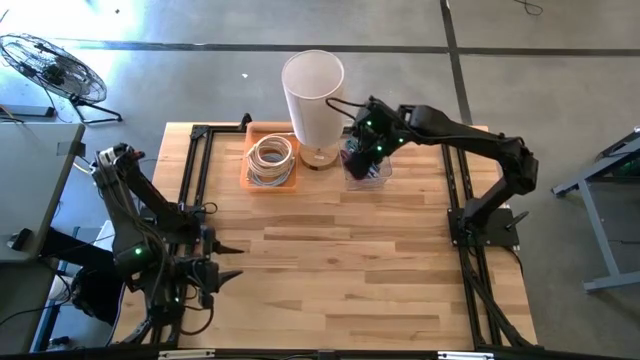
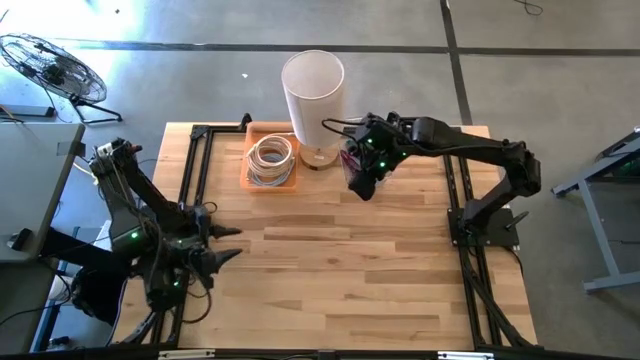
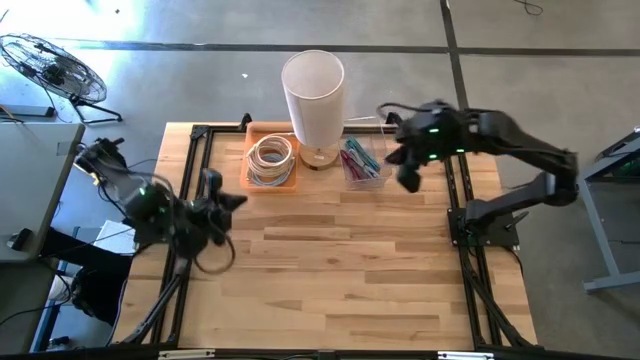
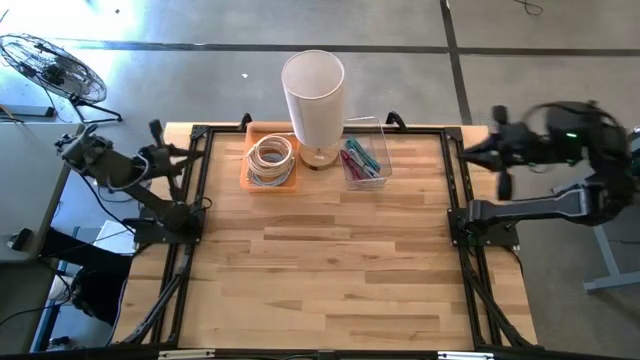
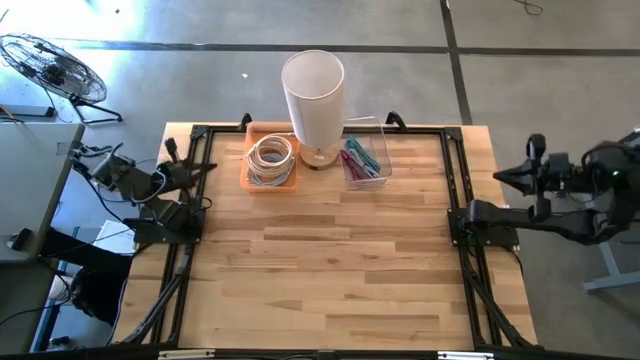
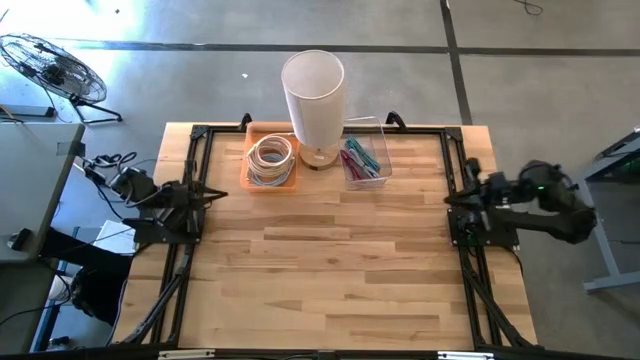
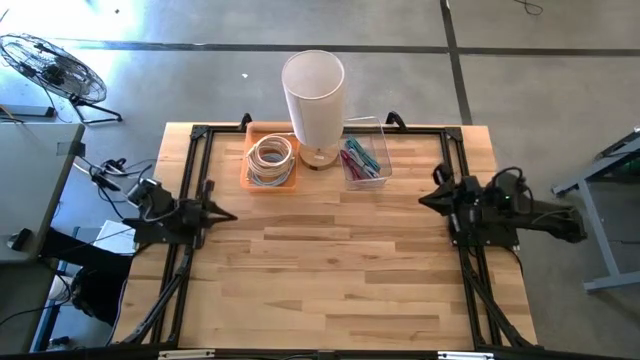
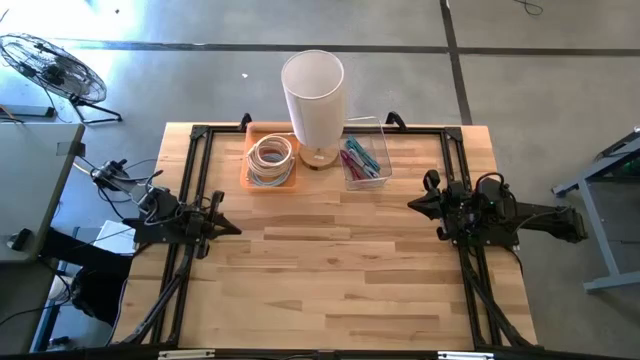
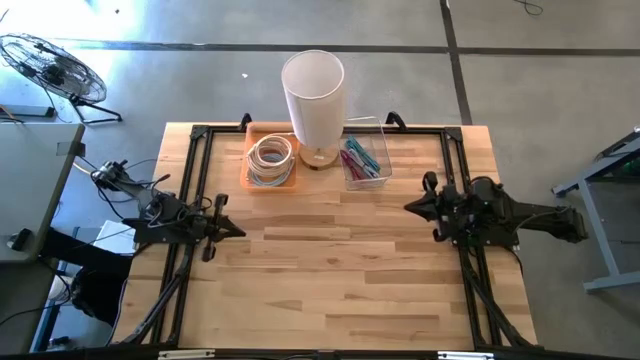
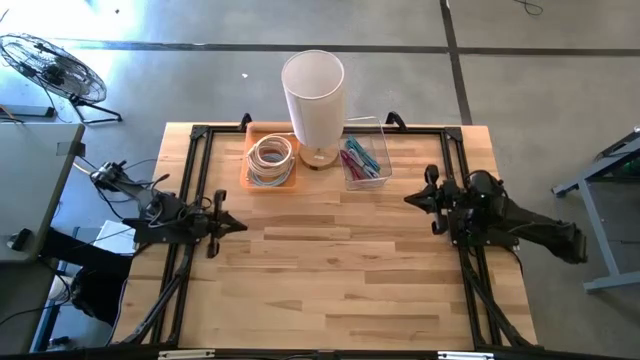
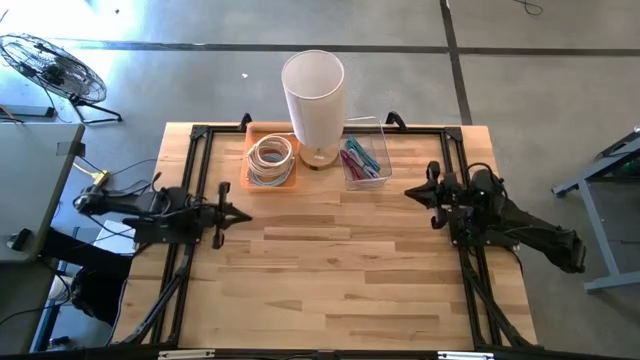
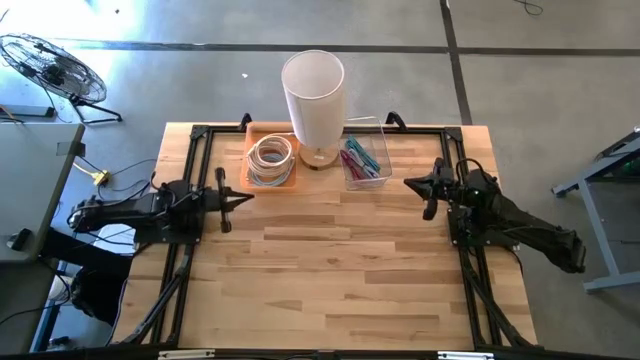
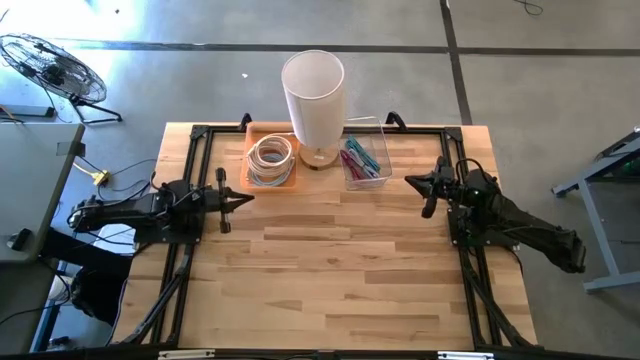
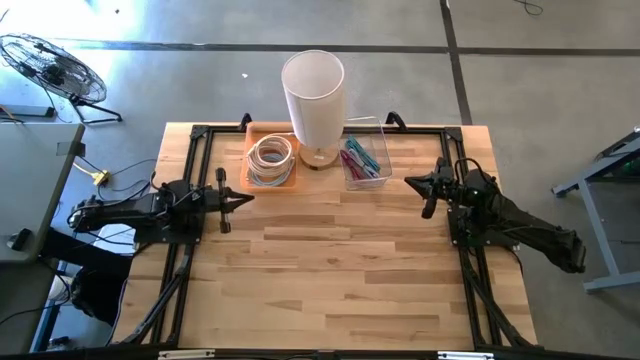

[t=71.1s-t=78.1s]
Task: Pick & Place USB Port
Return to Home Position

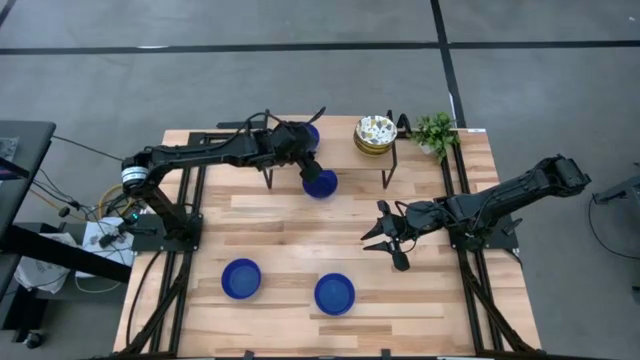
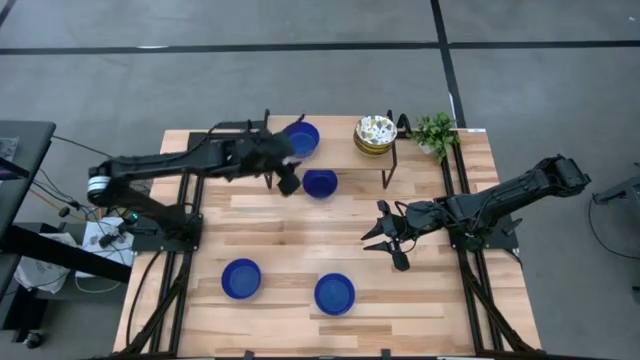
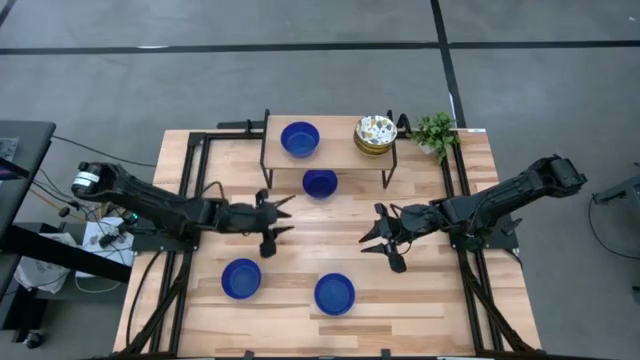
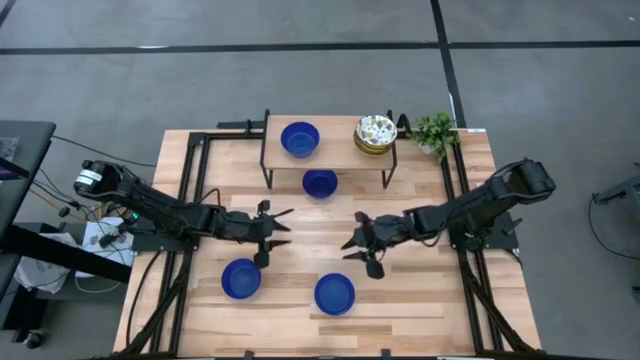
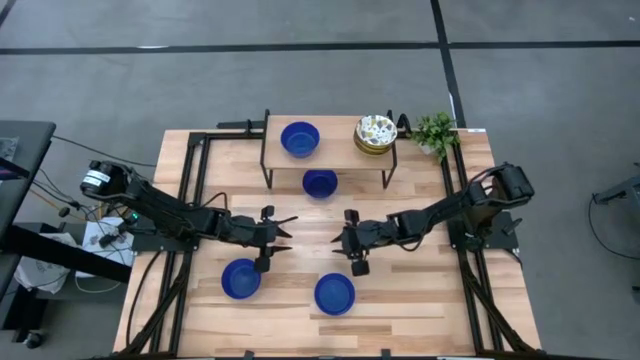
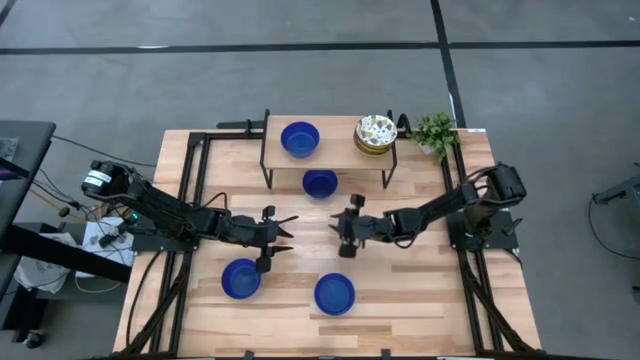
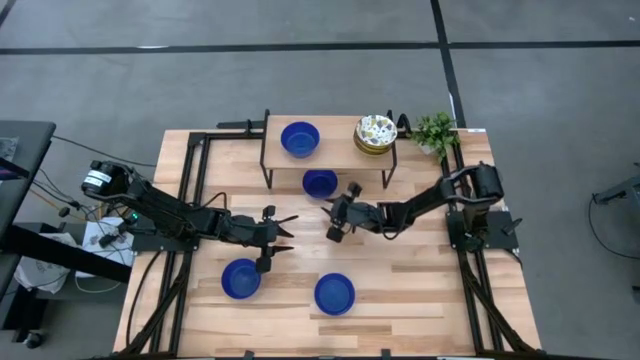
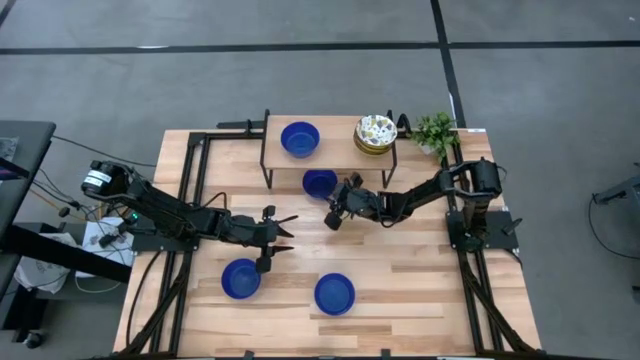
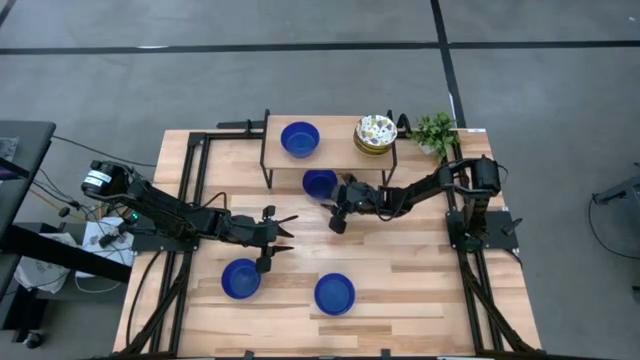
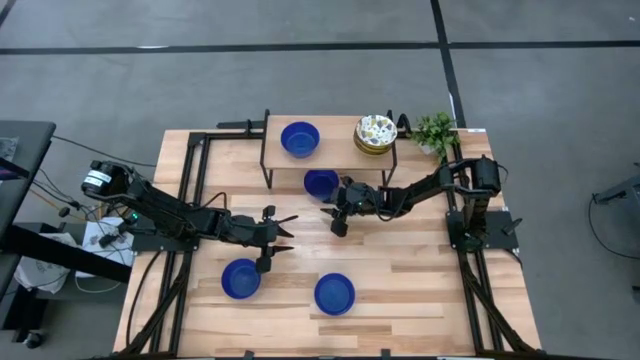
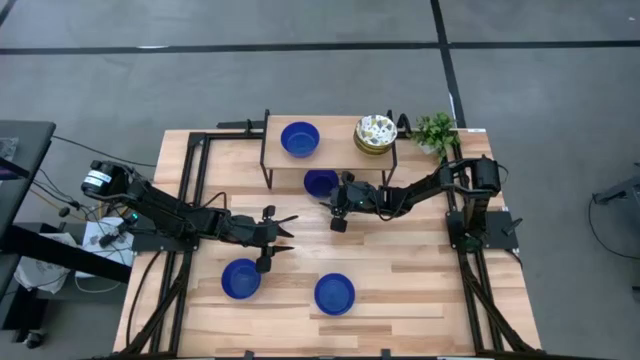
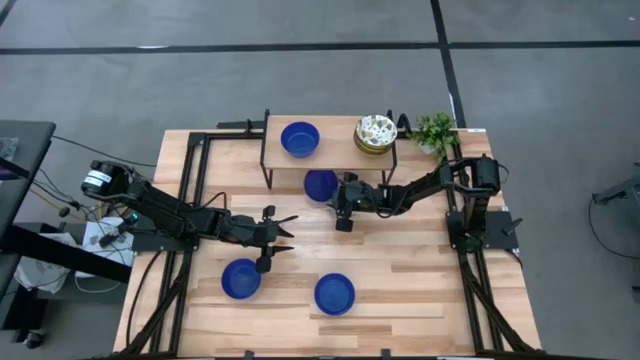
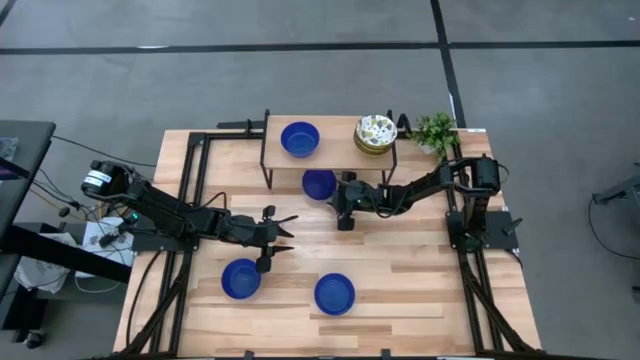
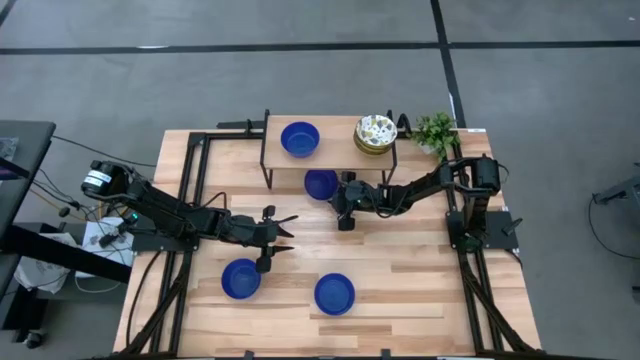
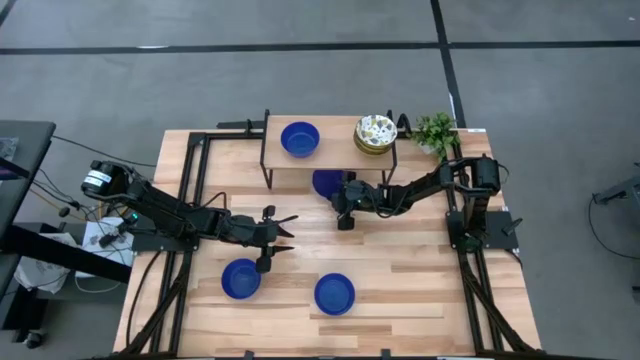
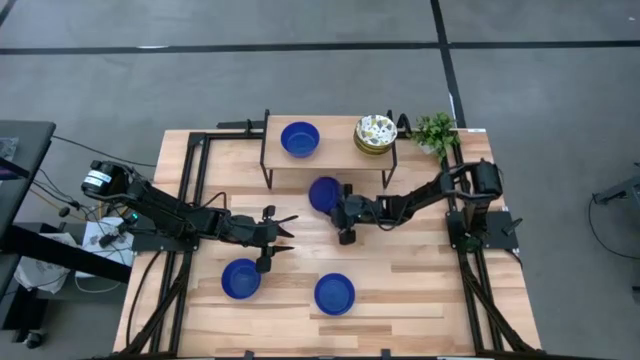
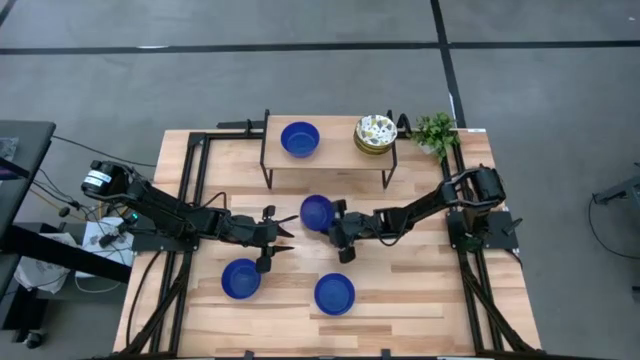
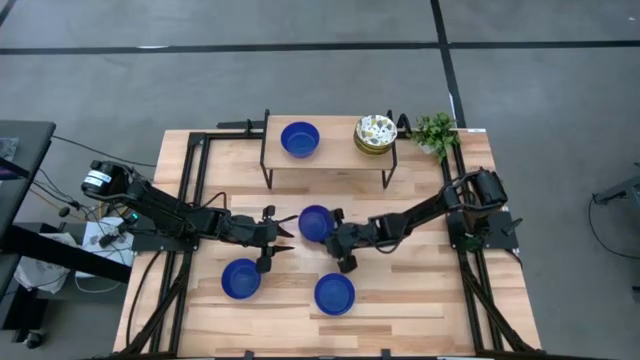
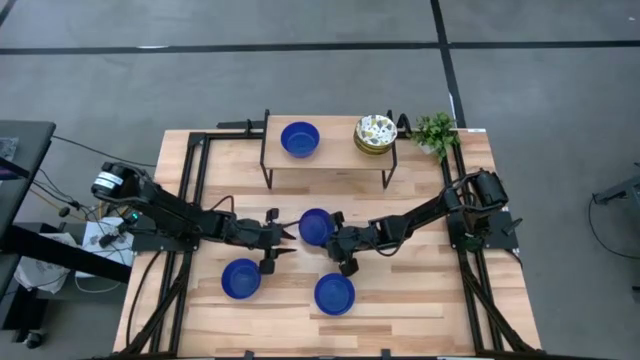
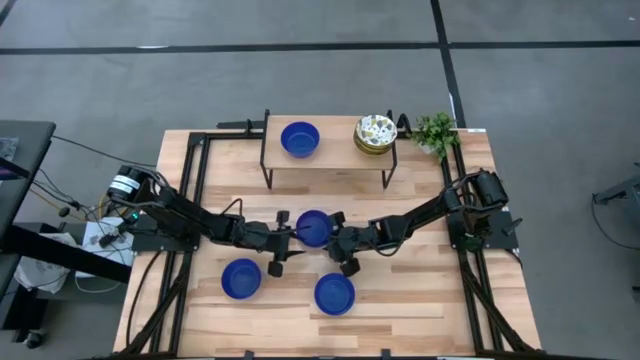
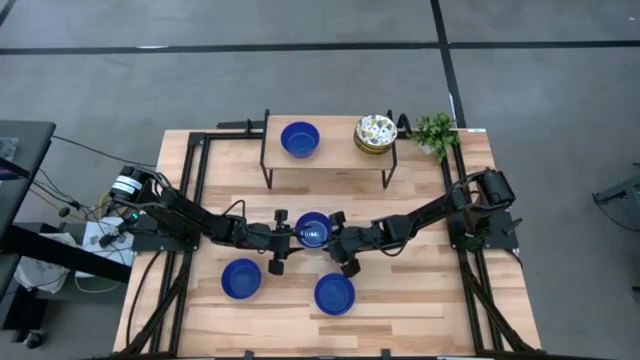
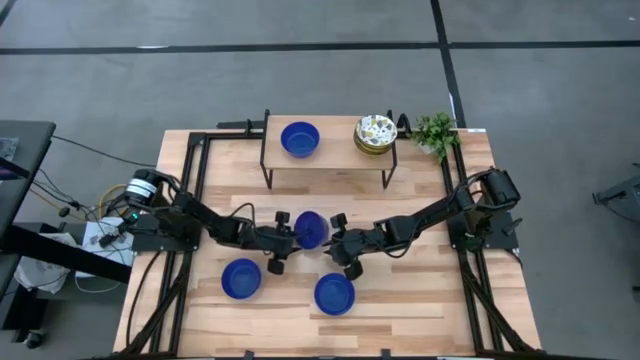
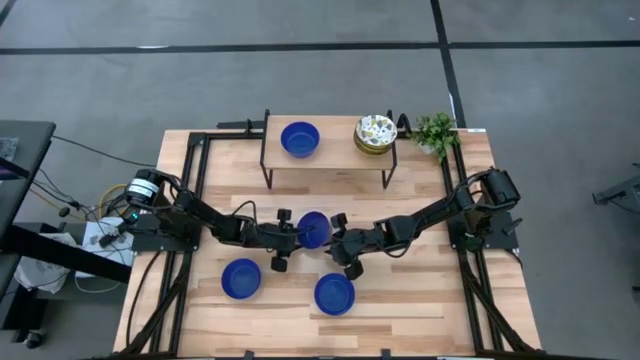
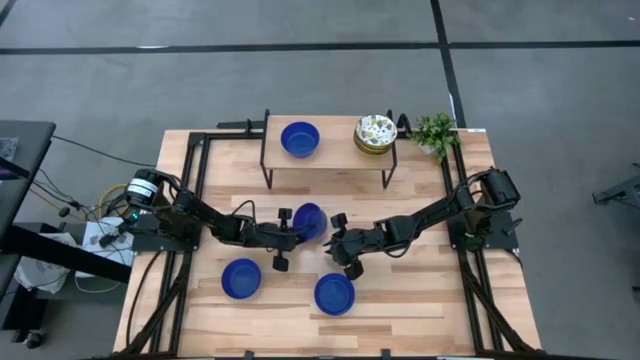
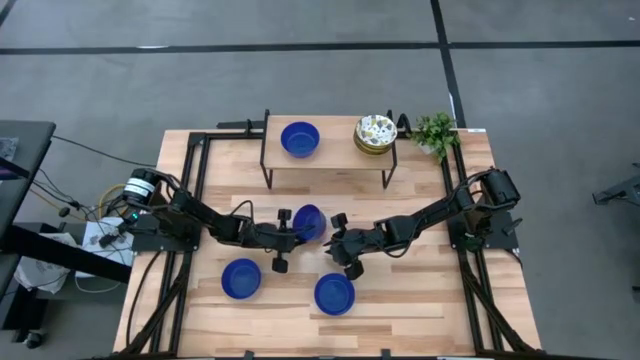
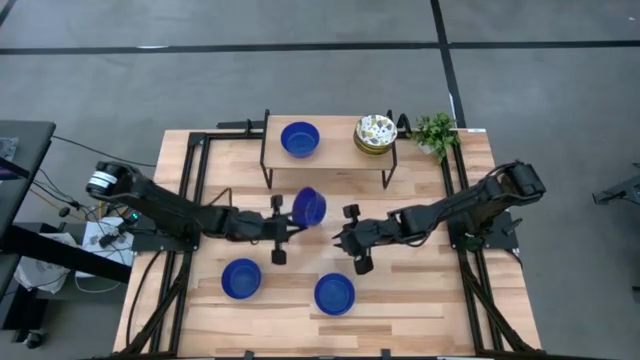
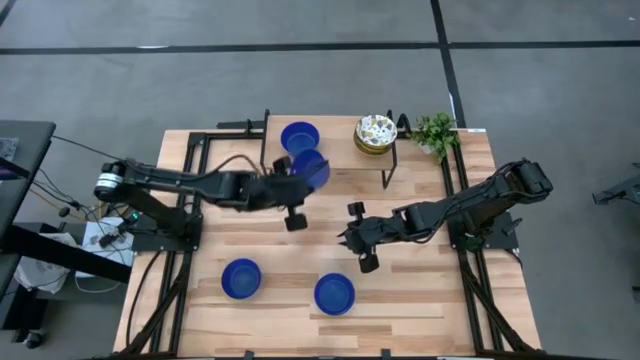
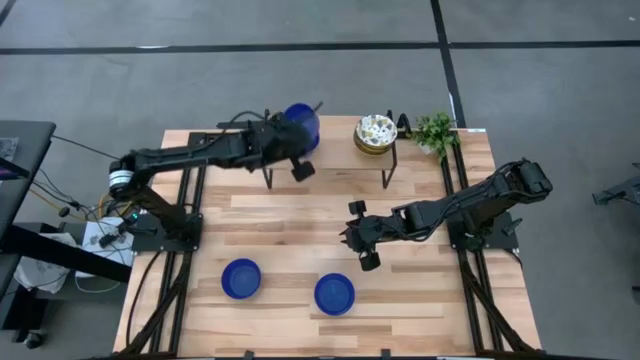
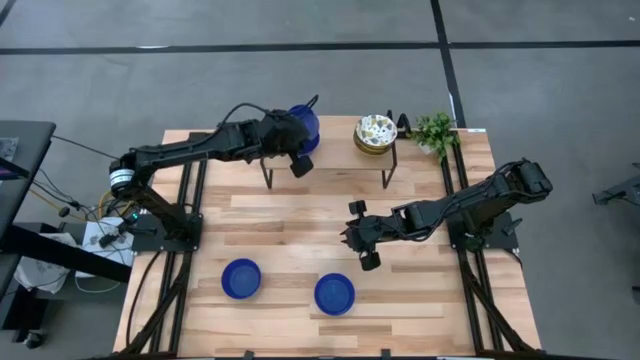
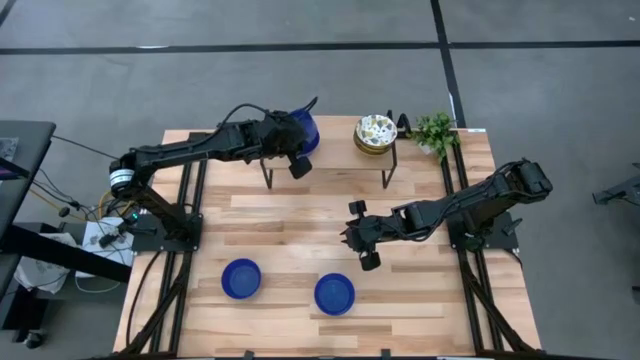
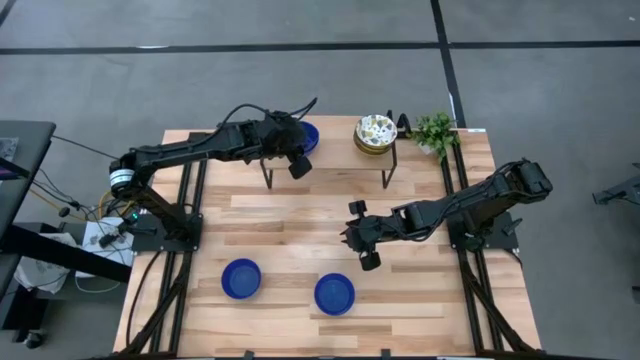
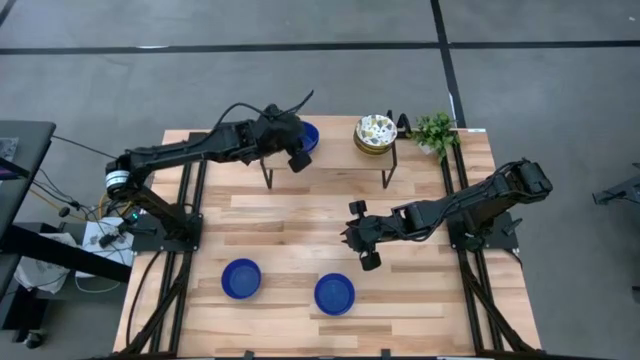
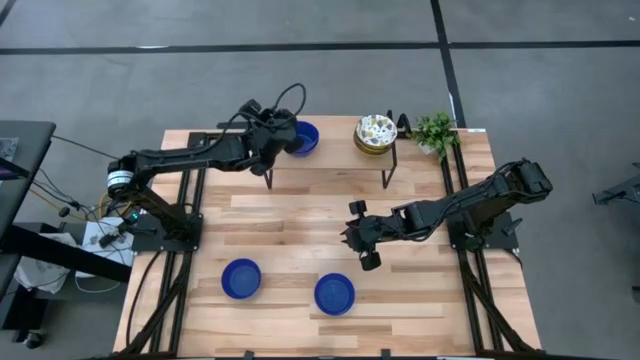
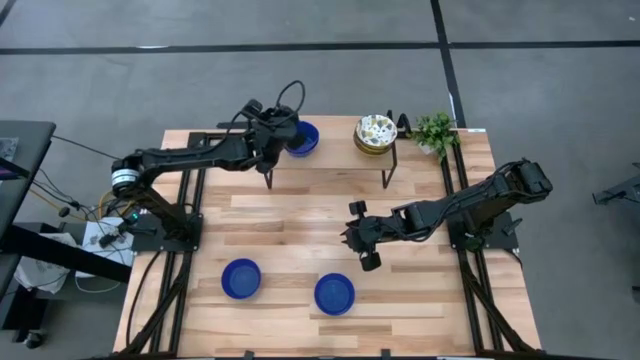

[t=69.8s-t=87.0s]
Task: Pick & Place Mini bowls
Stack the blue bowl on the blue bowl on the shelf
